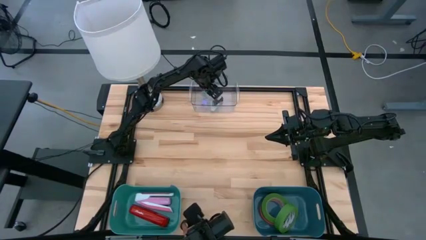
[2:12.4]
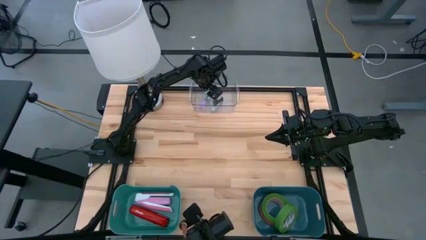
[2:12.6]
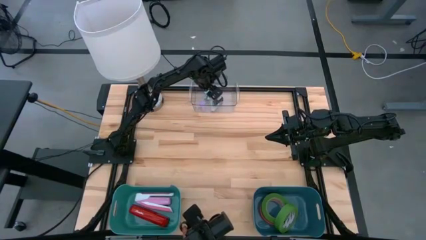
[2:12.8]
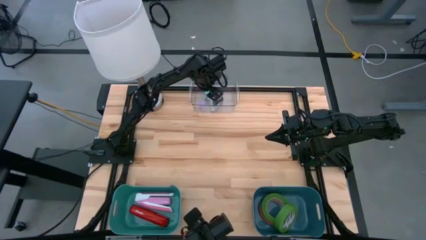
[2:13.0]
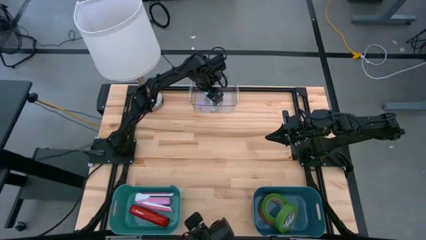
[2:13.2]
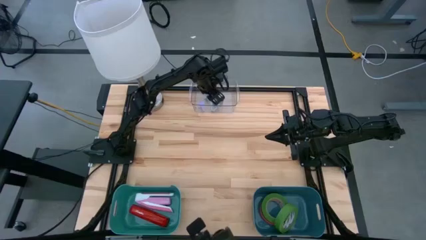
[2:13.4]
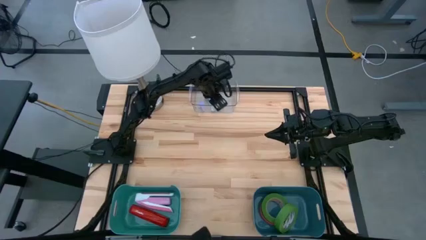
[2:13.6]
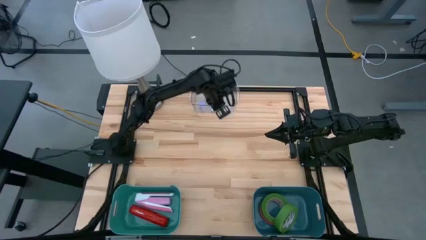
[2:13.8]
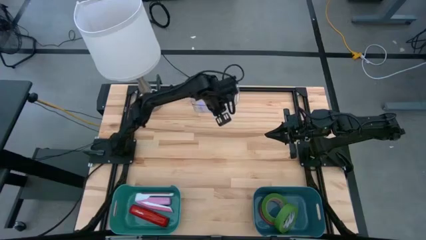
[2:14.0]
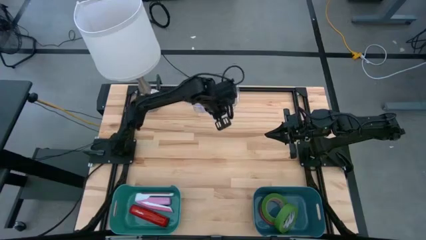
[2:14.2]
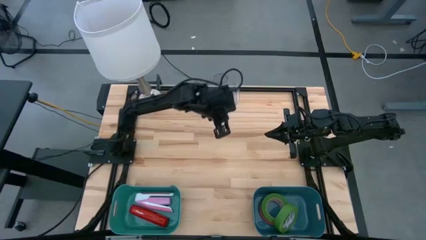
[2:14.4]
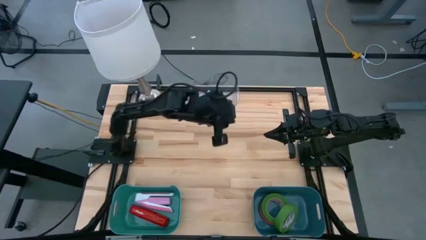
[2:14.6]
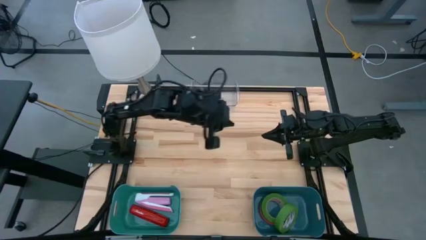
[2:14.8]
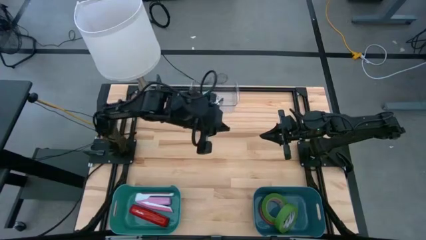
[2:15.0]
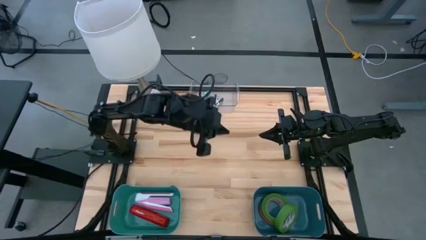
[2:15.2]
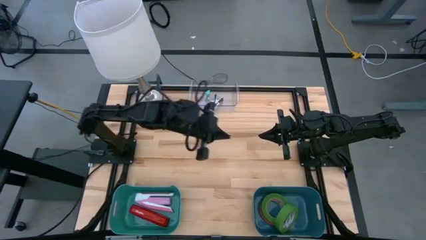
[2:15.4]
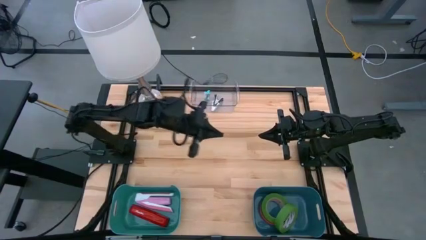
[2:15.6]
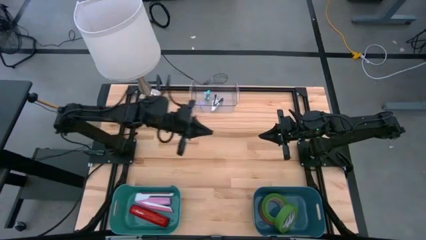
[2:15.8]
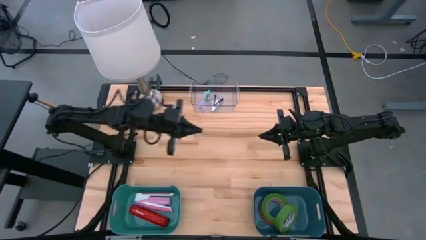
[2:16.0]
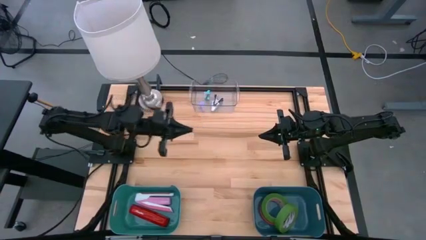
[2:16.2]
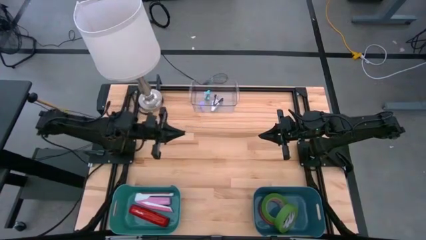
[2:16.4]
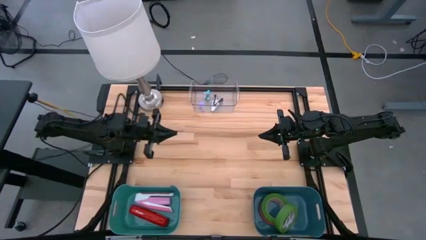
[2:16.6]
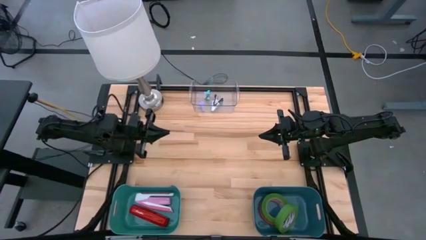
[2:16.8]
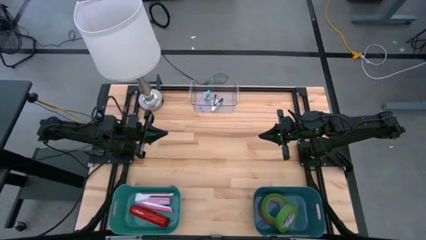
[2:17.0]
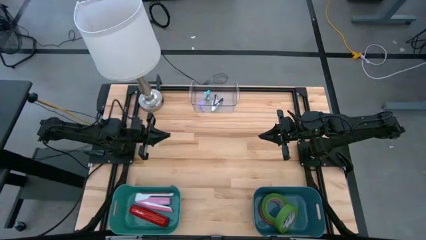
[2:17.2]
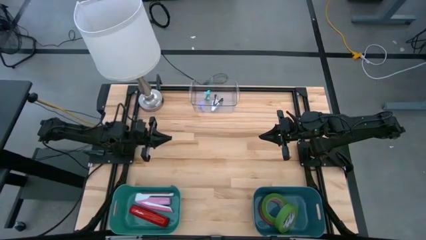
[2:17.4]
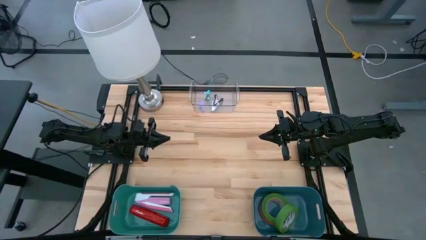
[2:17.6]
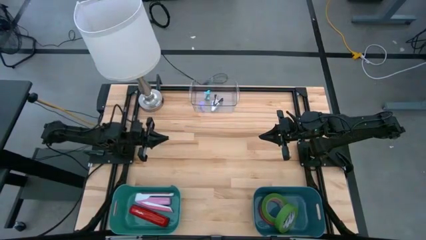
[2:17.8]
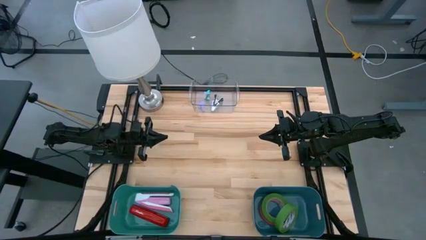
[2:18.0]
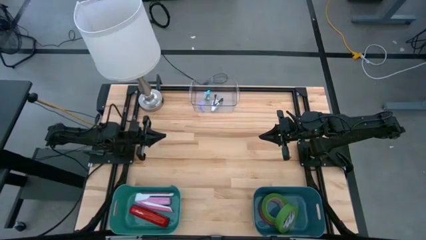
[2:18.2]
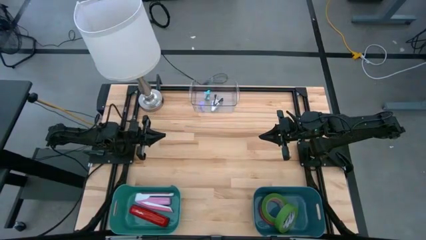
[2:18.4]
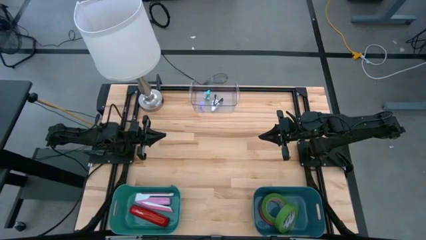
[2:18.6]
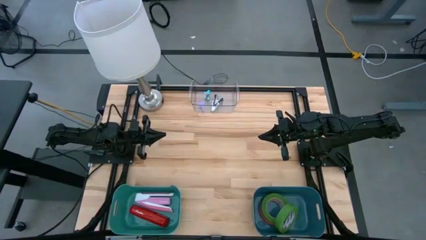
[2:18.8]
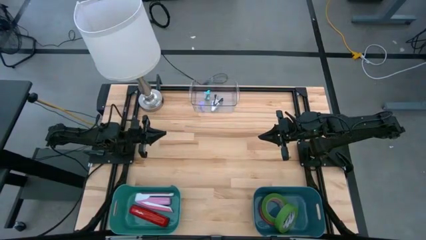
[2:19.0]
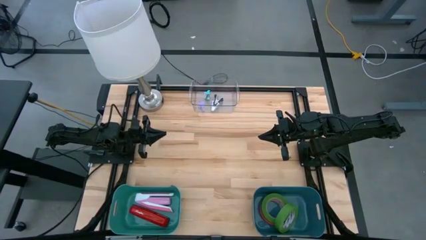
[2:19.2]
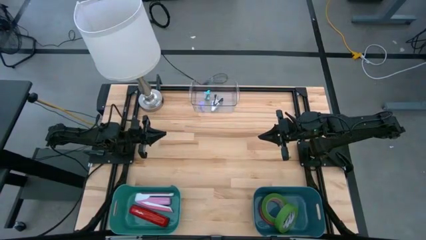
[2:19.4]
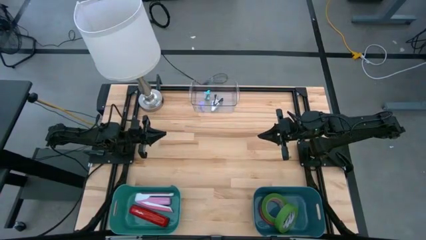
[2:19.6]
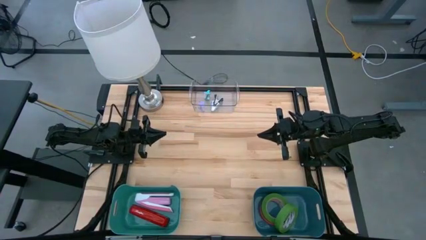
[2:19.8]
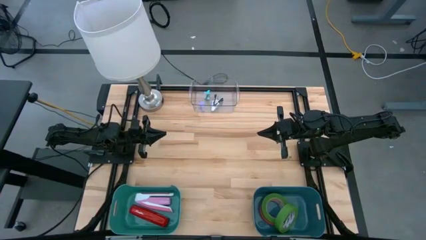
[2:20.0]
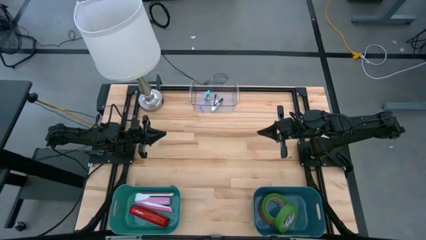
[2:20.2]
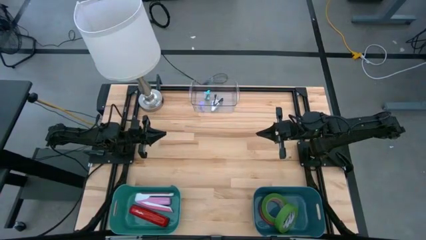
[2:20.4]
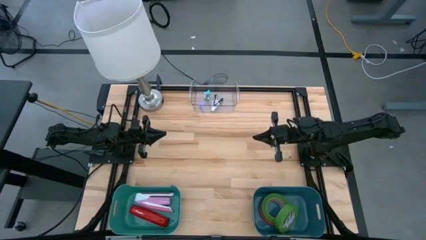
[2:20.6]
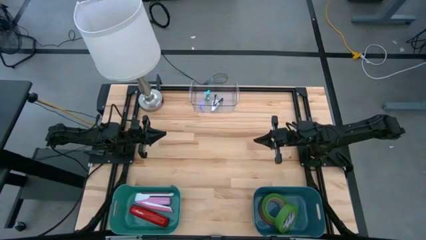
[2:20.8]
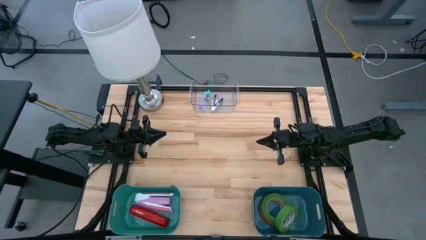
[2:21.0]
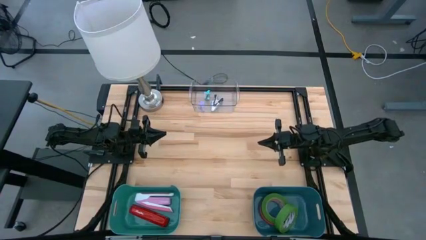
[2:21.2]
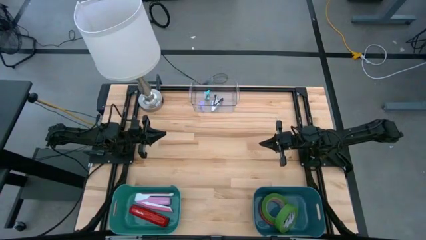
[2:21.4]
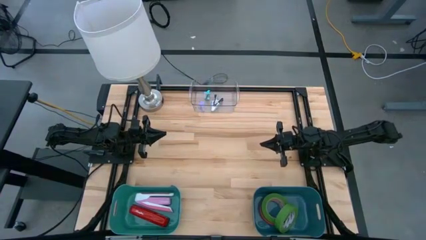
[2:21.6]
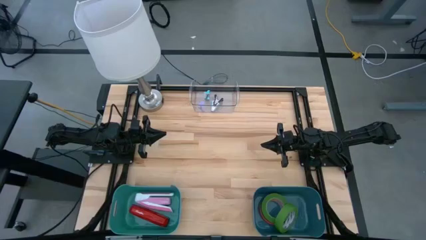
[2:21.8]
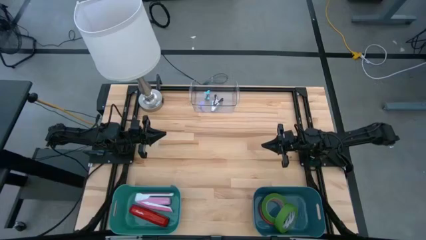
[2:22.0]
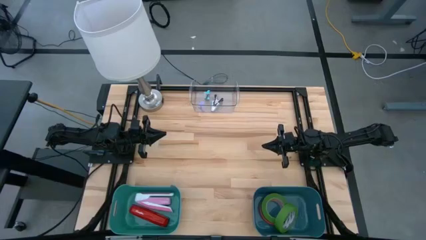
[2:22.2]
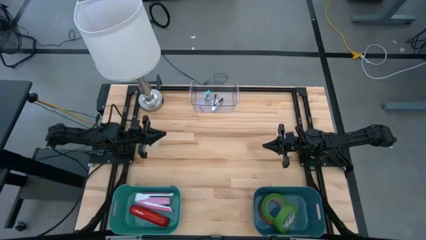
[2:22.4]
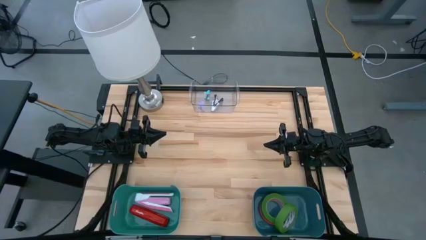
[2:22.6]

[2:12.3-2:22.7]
Task: Pick and place Stapler, Stapler remover, tape
Return to Home Position
